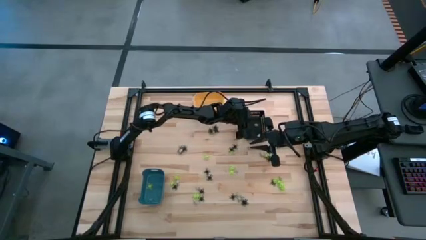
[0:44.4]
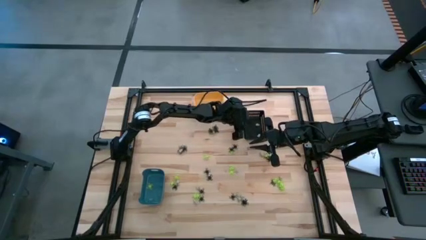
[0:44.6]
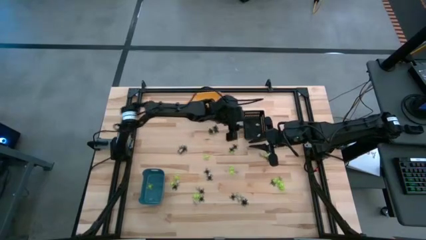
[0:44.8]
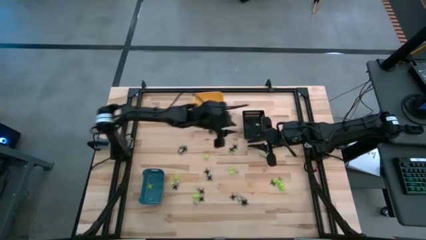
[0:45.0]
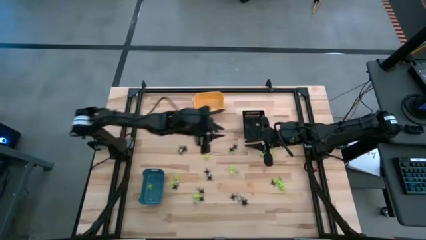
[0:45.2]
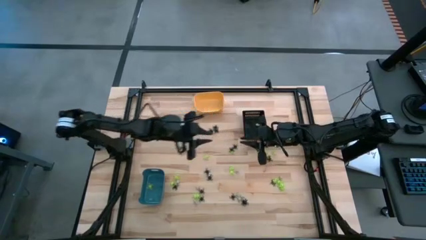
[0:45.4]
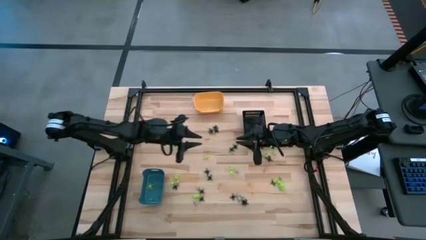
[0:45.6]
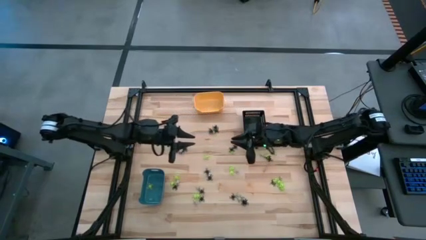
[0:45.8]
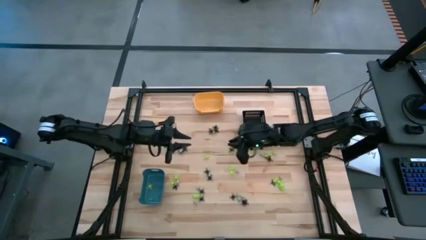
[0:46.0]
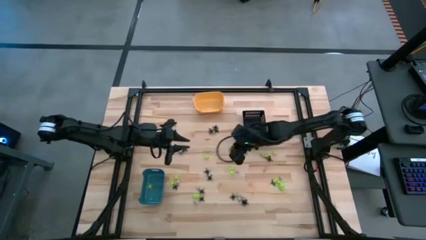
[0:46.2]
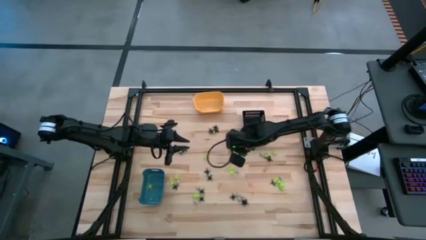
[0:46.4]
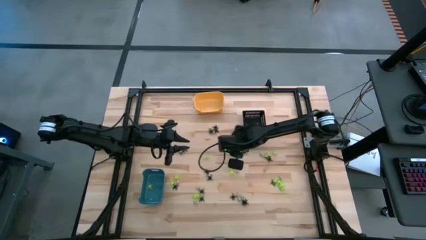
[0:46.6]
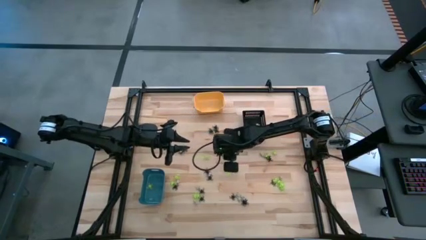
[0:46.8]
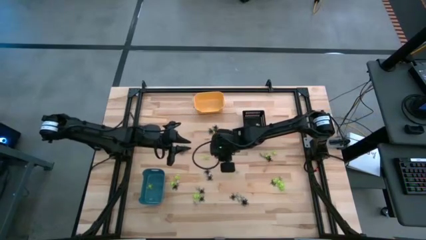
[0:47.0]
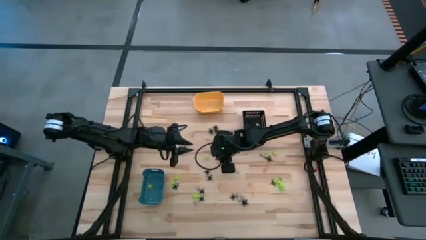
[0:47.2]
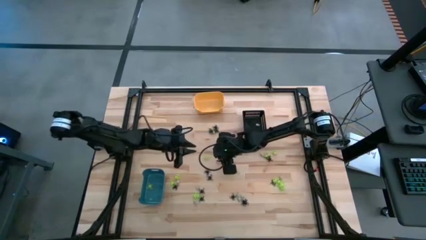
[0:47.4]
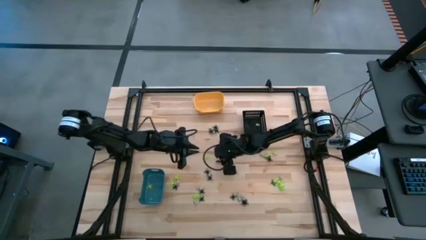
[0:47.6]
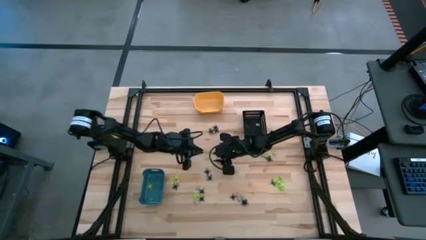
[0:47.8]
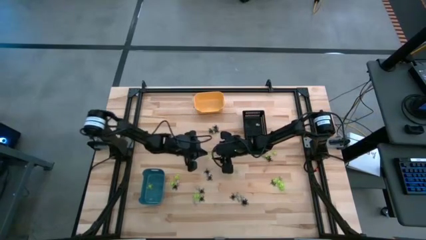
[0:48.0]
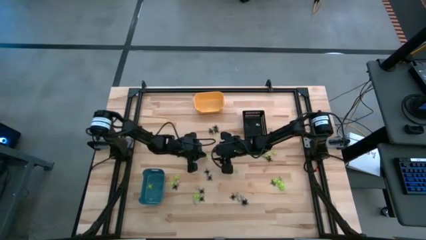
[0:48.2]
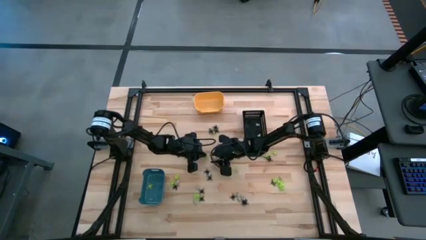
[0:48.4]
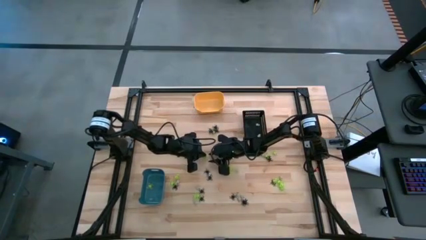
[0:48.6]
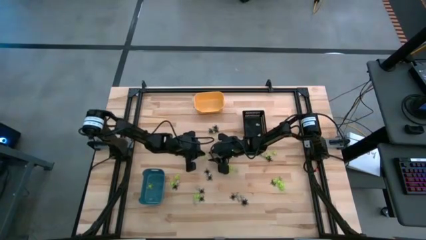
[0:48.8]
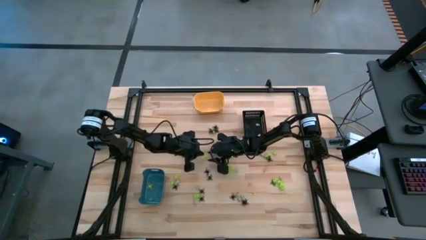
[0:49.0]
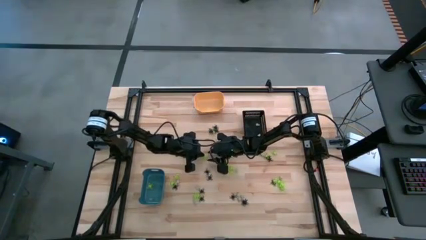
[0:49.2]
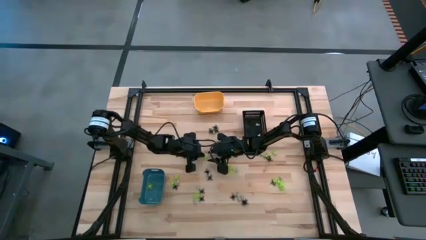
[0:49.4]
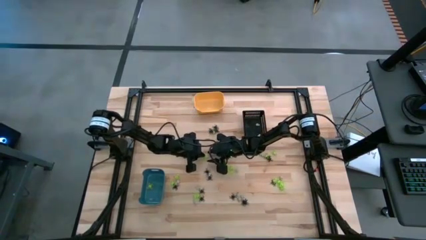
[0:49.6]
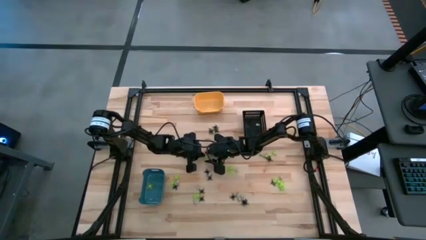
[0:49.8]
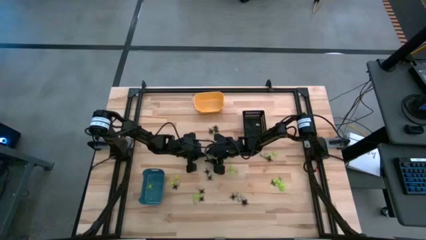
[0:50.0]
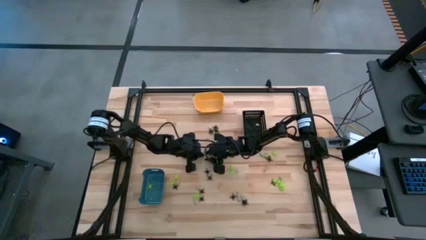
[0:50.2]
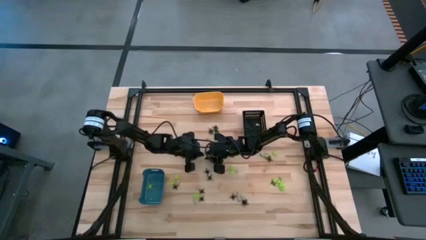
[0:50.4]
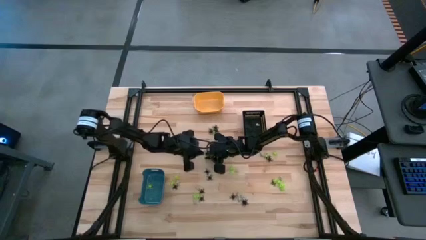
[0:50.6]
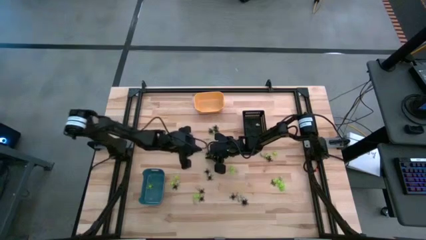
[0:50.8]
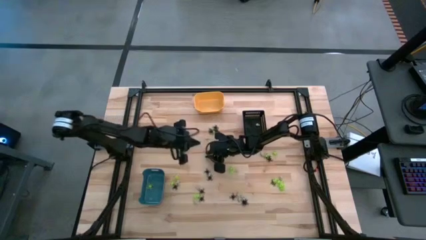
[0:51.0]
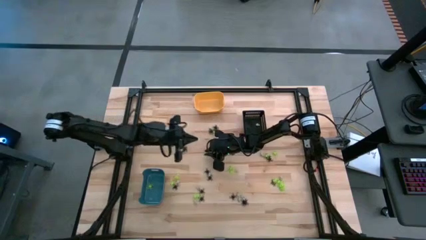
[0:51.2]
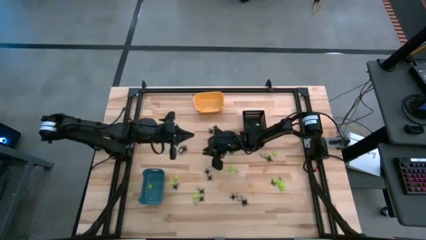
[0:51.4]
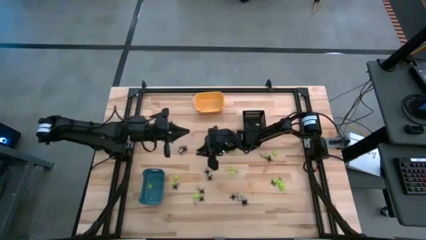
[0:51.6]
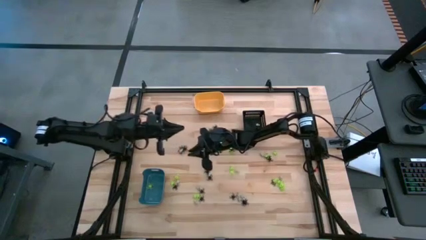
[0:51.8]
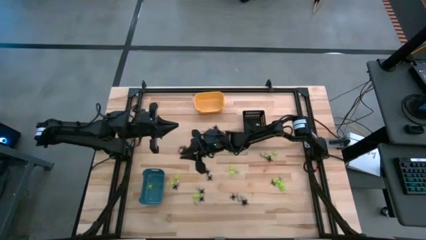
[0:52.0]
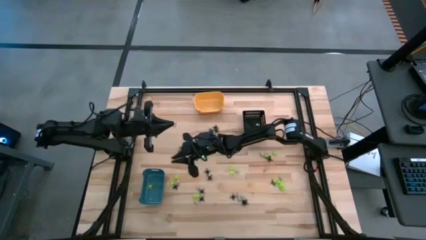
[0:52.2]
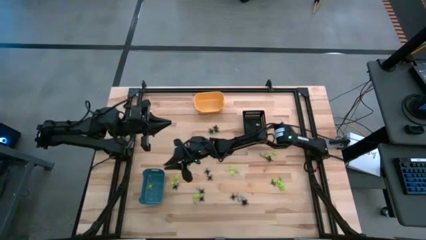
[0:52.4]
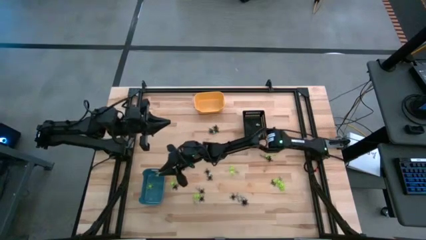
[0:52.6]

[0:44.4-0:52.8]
Task: Sort Halloween decoration
Put the green spider toy into the blue bin

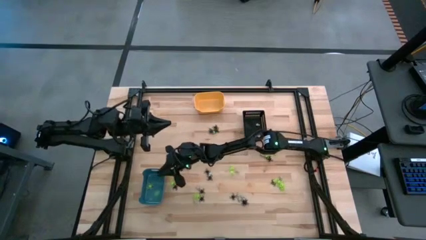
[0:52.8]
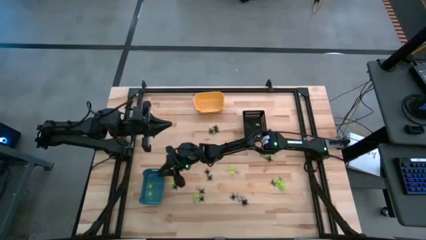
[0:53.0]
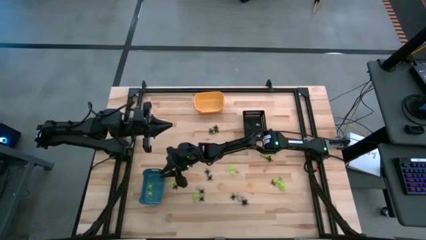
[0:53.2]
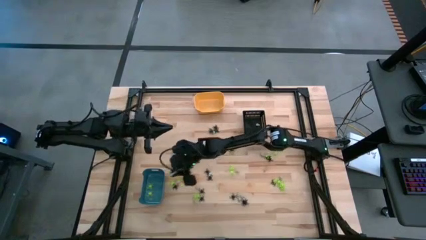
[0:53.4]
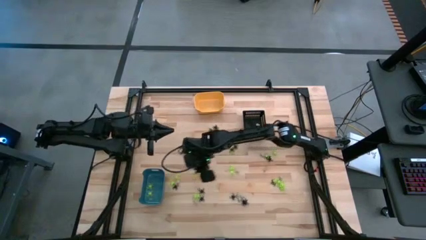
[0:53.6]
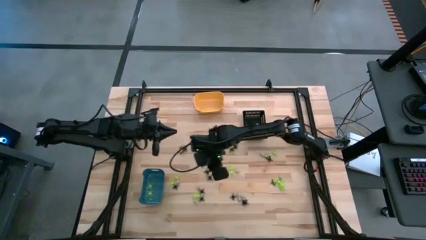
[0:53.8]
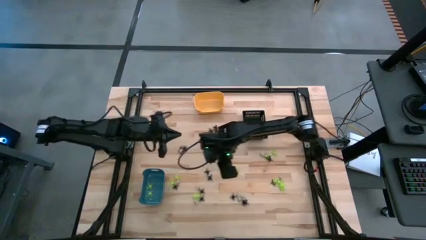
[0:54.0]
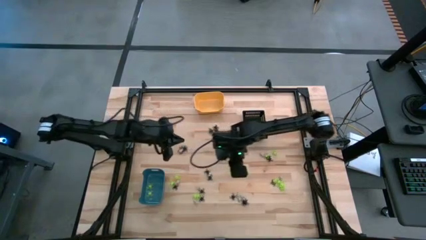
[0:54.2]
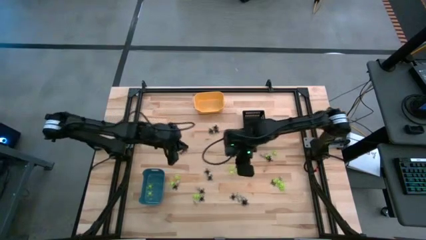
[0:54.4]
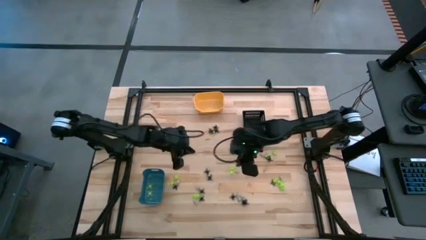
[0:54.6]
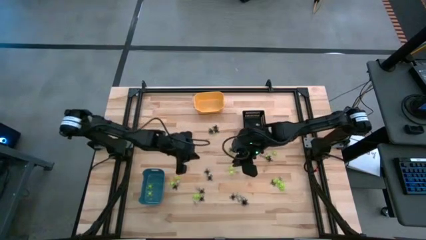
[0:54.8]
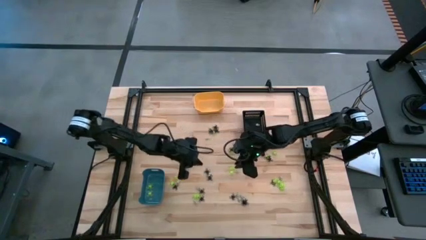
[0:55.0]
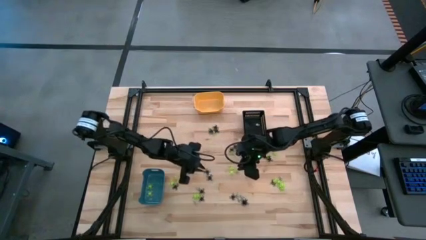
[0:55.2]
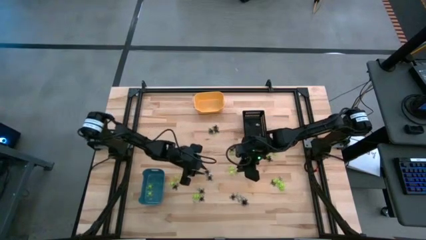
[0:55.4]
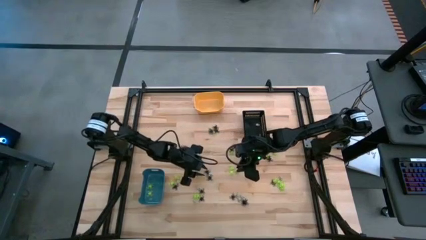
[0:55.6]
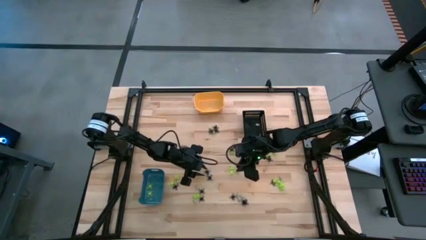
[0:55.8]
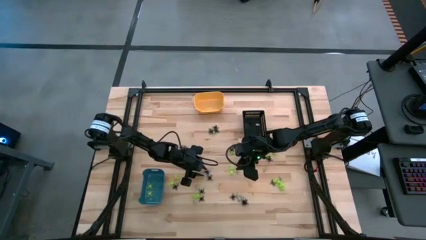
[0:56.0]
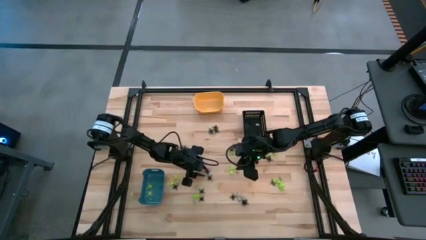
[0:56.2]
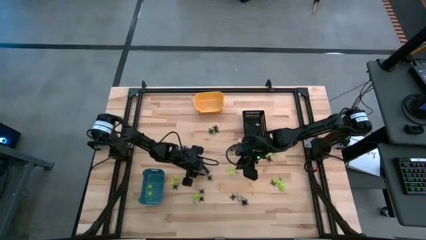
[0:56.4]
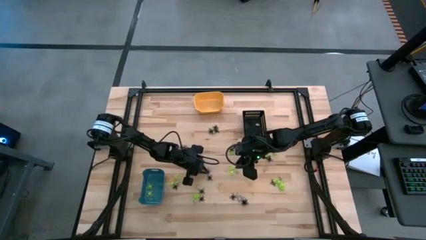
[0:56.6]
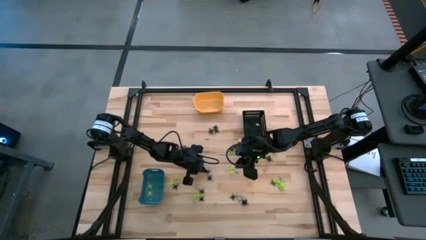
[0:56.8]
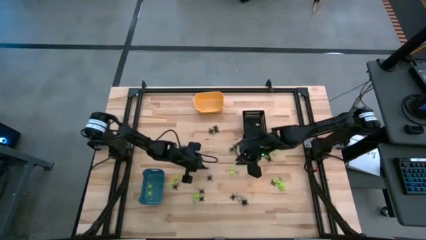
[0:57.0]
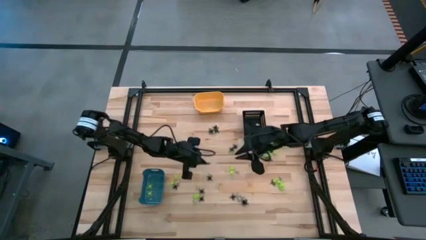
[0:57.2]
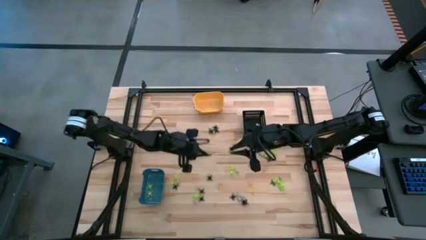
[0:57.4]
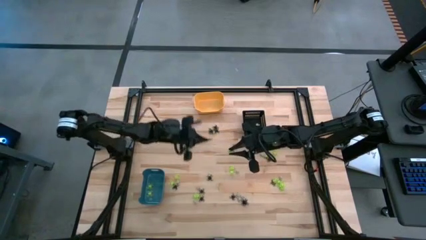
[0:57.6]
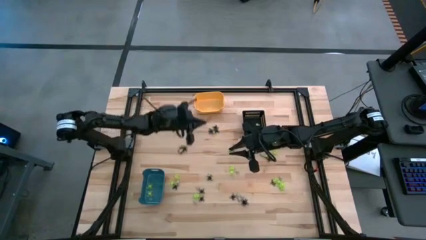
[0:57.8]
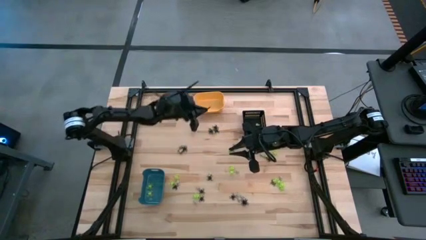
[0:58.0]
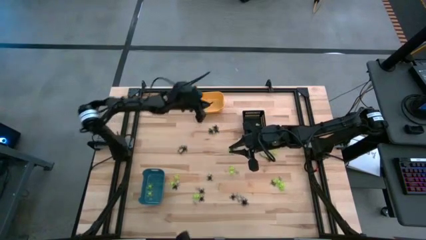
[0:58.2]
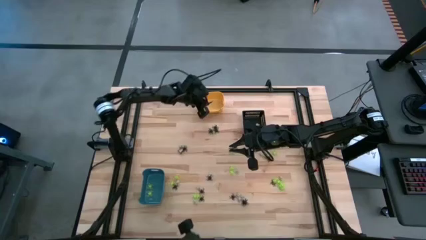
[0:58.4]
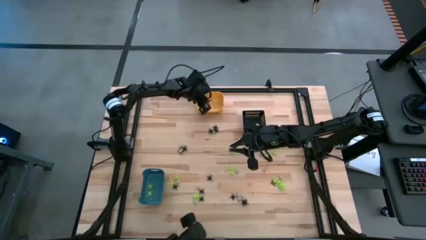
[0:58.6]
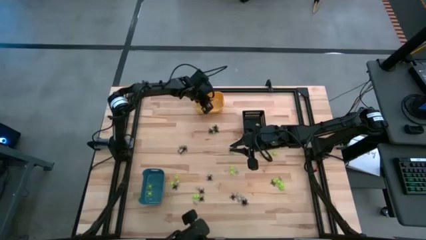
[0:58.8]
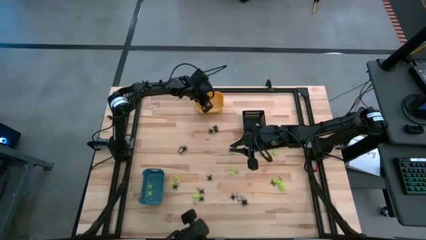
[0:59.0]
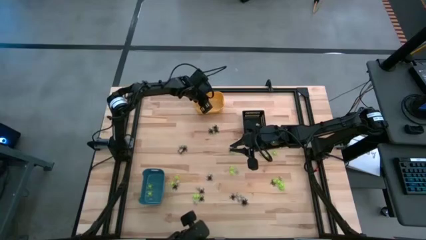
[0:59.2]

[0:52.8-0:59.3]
Put the black spider toy into the yellow bin
